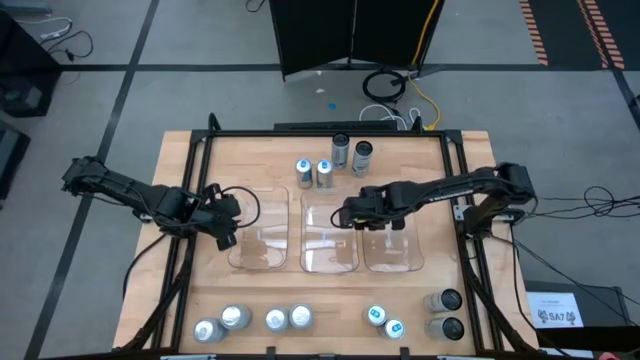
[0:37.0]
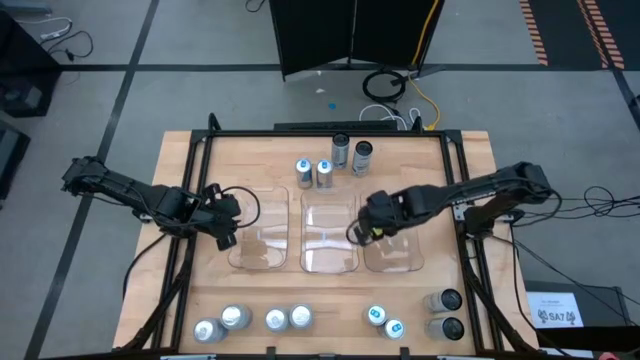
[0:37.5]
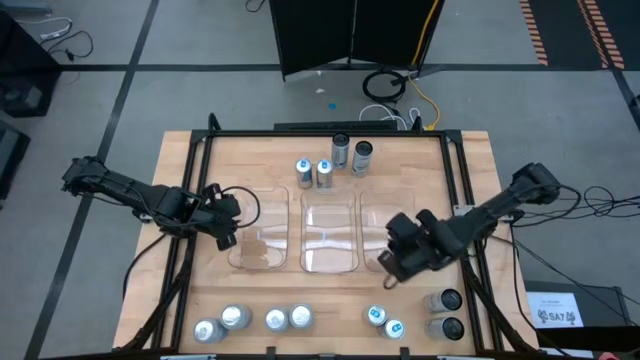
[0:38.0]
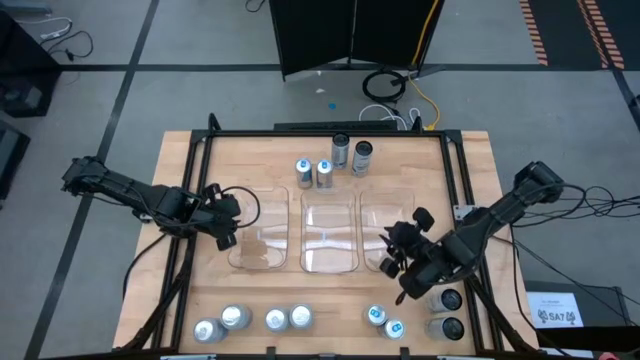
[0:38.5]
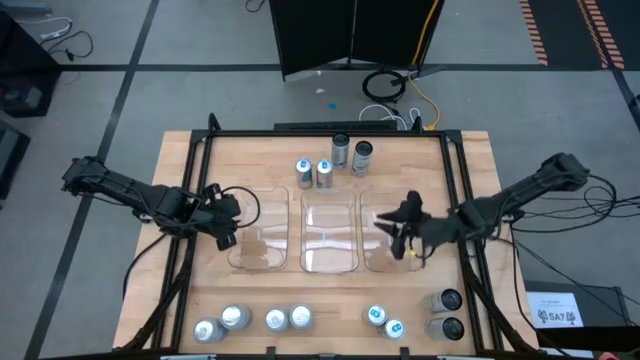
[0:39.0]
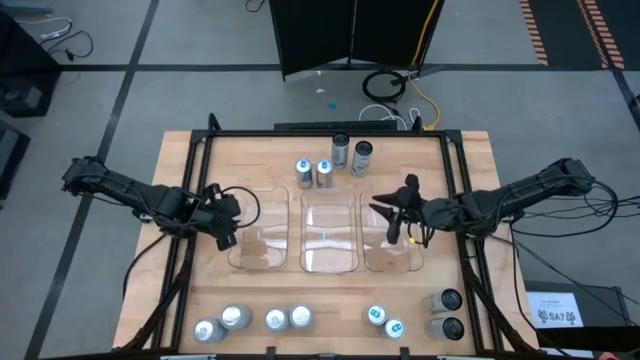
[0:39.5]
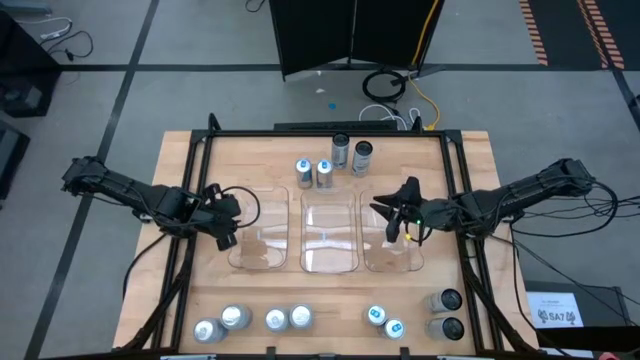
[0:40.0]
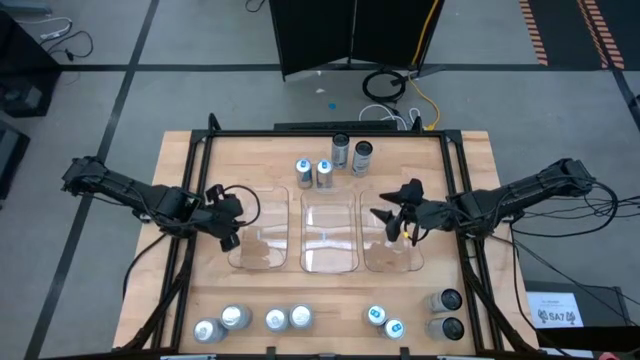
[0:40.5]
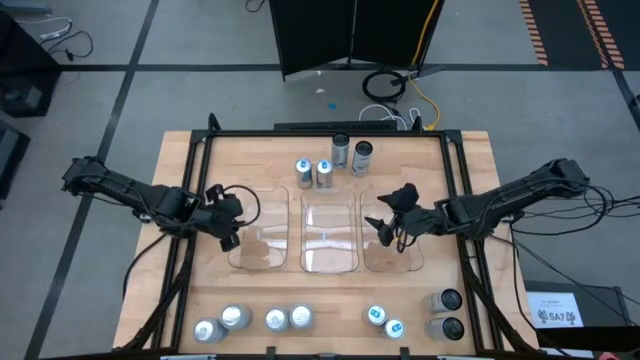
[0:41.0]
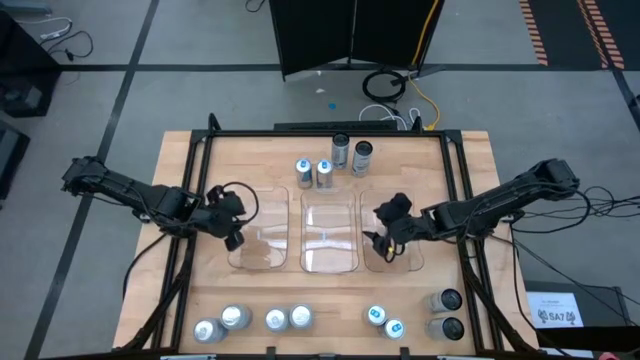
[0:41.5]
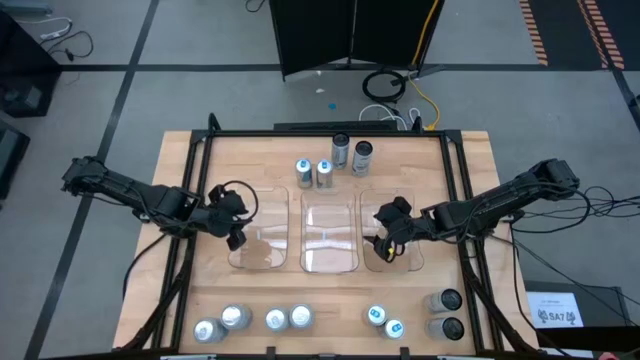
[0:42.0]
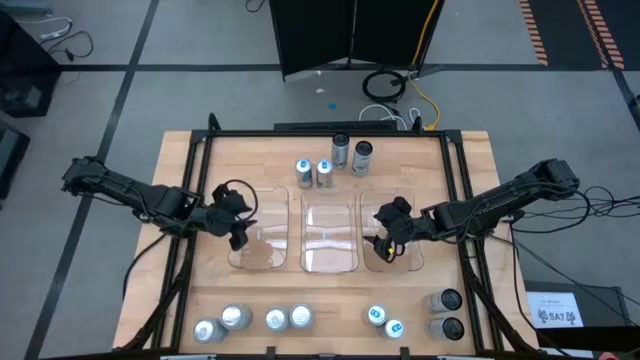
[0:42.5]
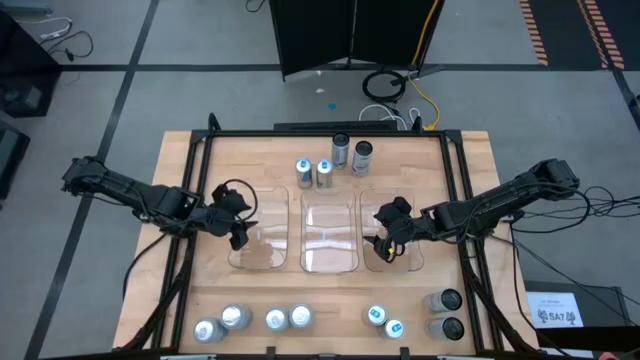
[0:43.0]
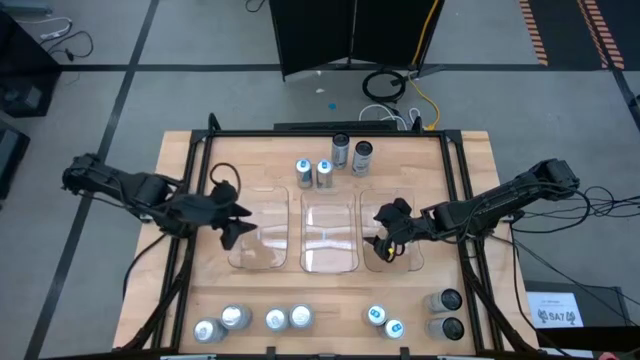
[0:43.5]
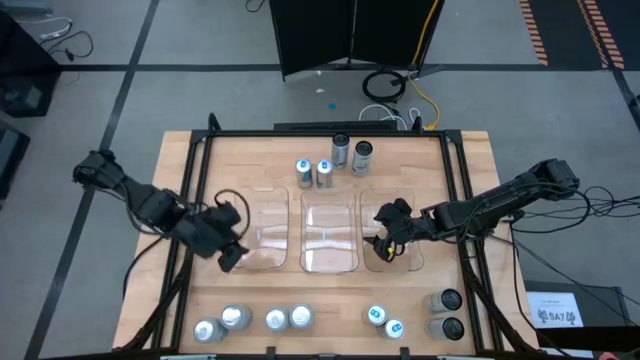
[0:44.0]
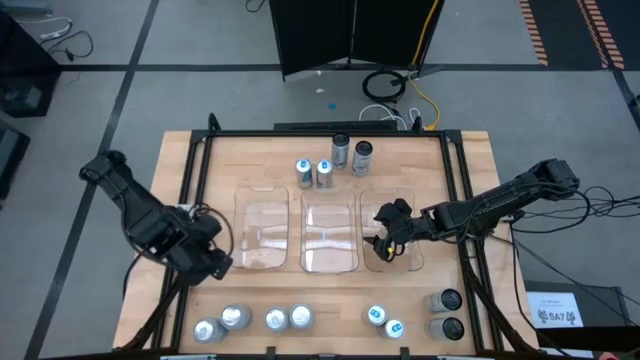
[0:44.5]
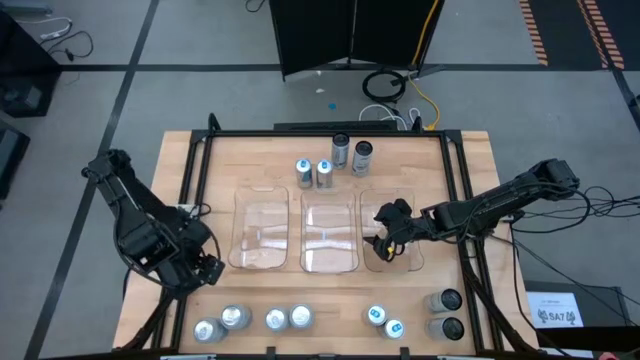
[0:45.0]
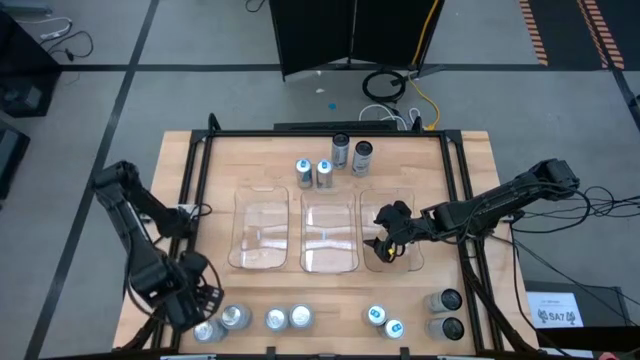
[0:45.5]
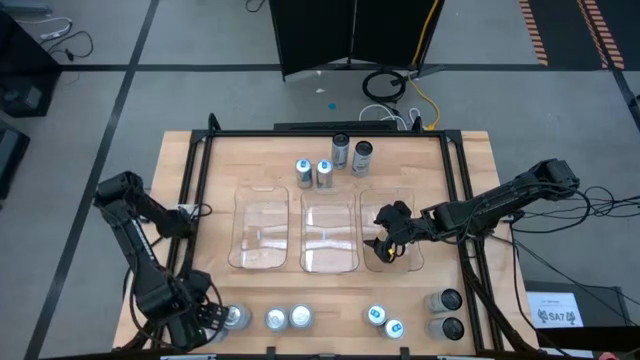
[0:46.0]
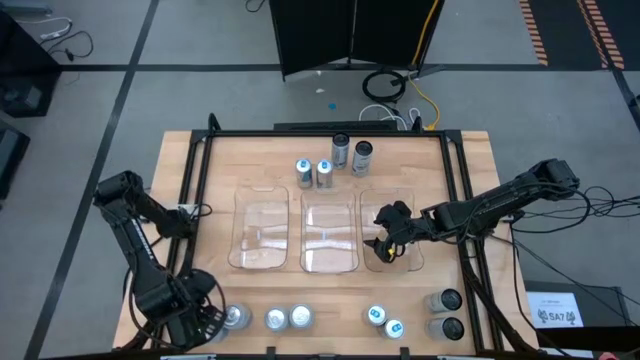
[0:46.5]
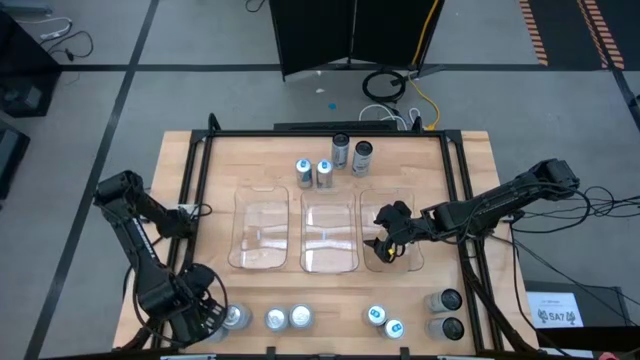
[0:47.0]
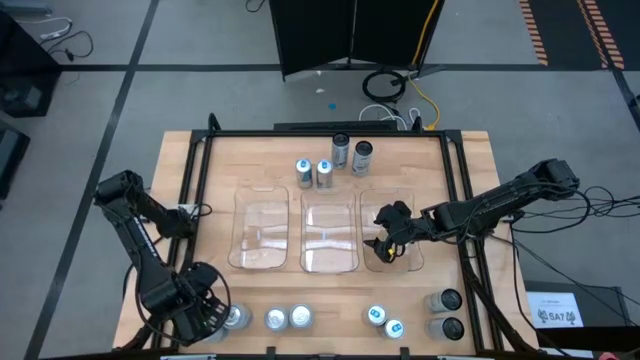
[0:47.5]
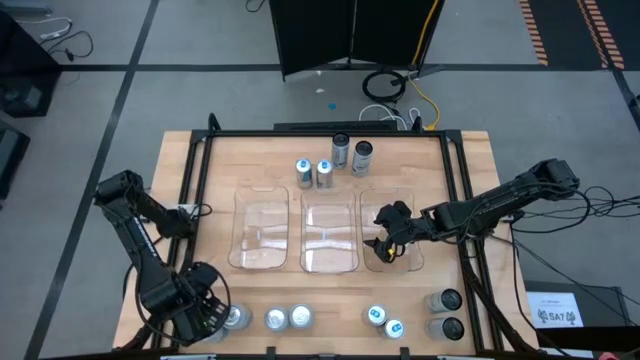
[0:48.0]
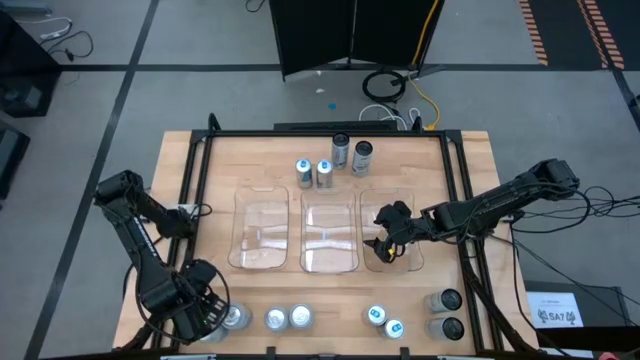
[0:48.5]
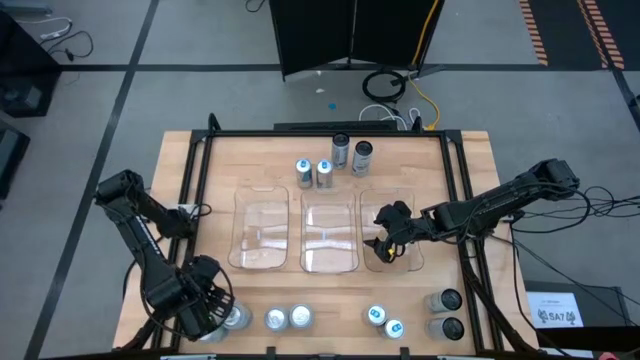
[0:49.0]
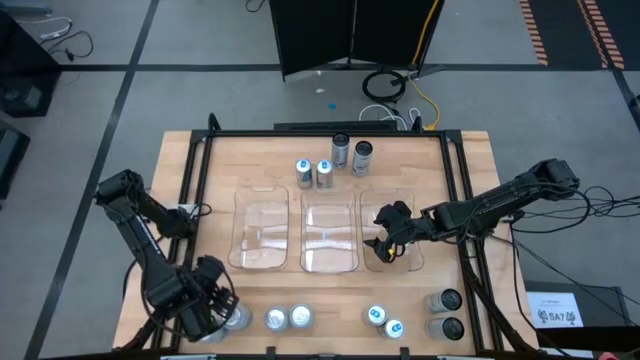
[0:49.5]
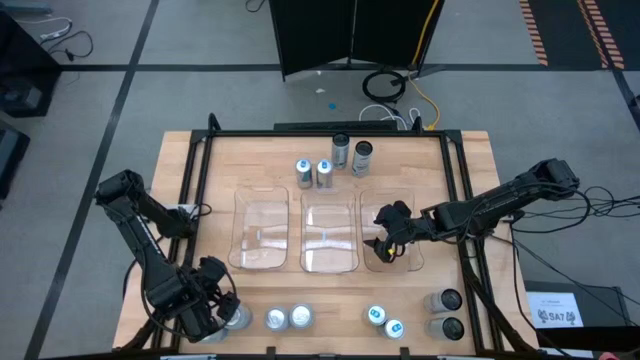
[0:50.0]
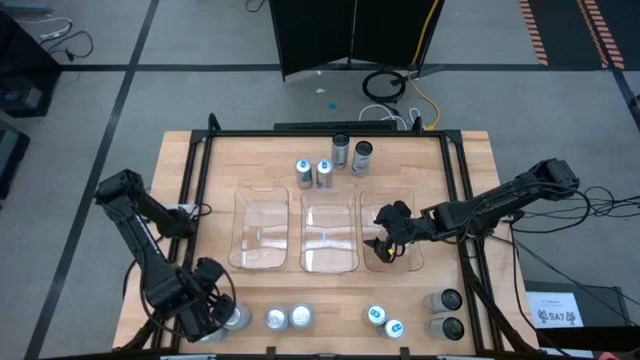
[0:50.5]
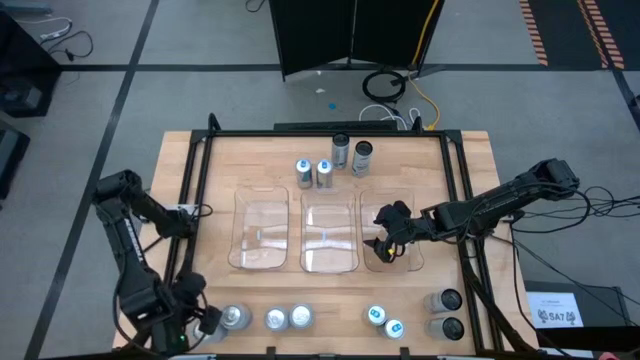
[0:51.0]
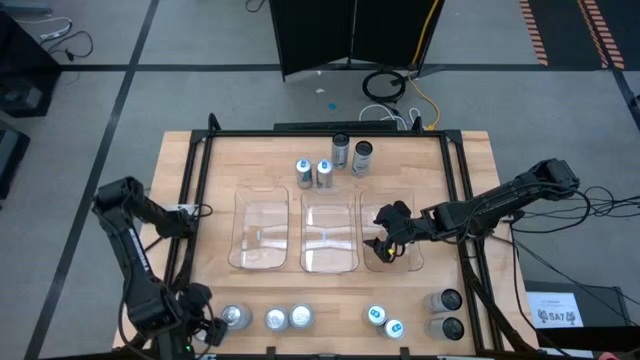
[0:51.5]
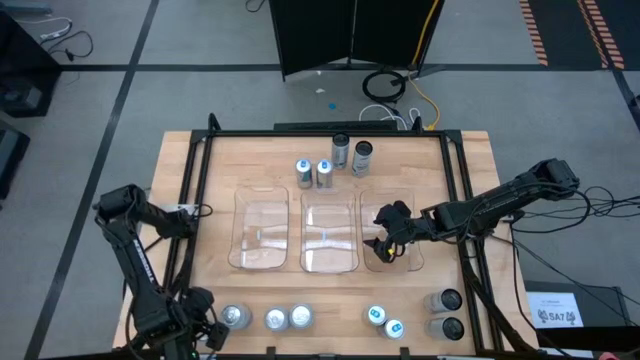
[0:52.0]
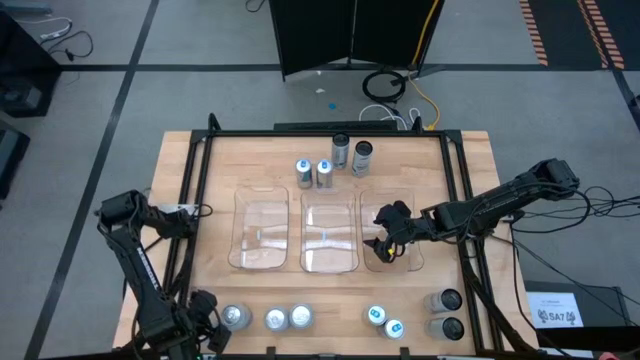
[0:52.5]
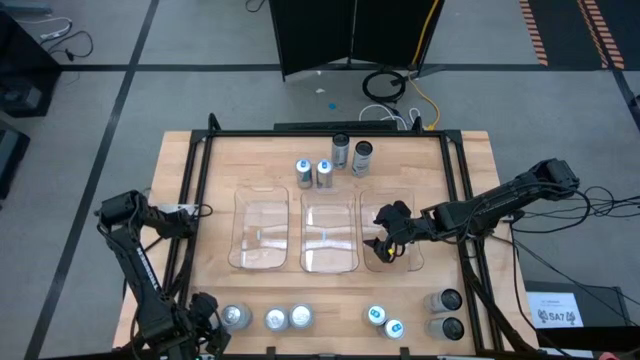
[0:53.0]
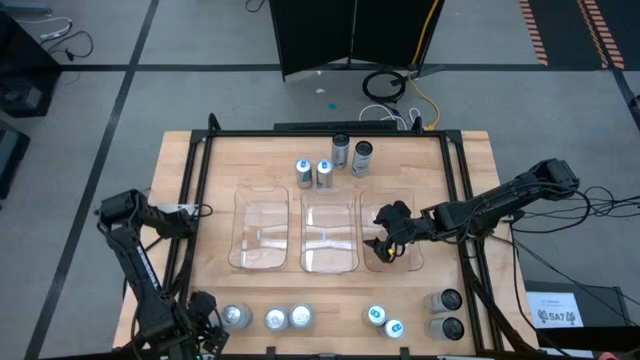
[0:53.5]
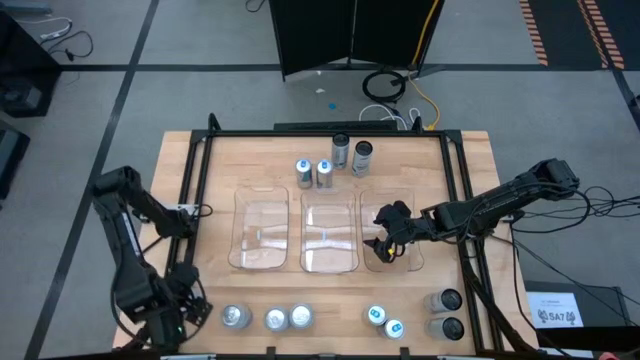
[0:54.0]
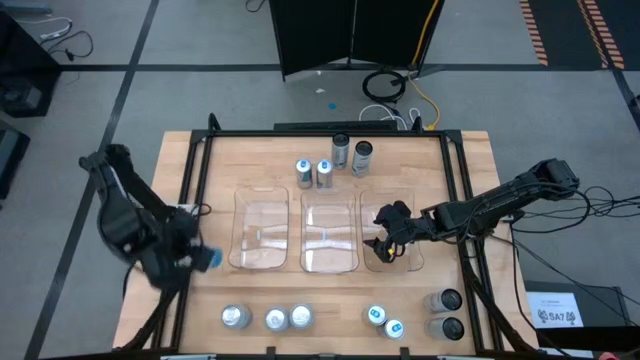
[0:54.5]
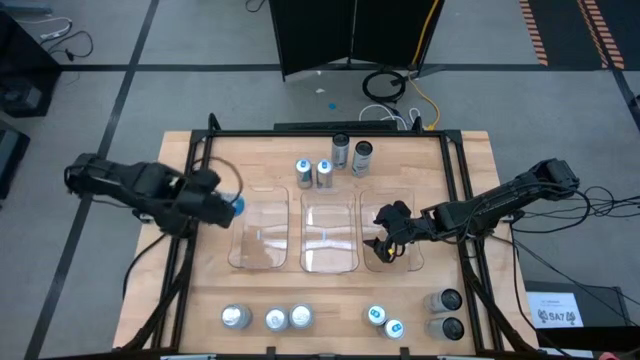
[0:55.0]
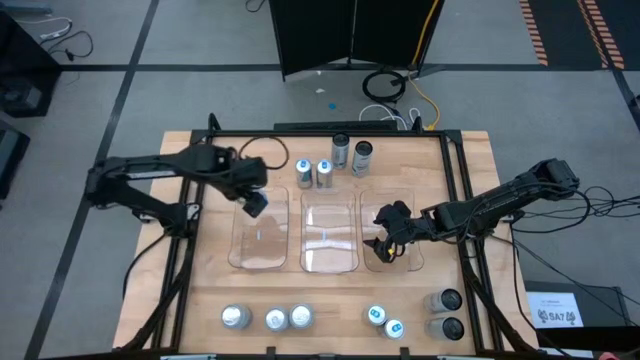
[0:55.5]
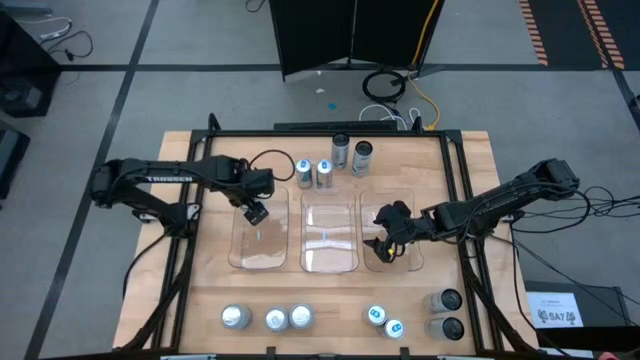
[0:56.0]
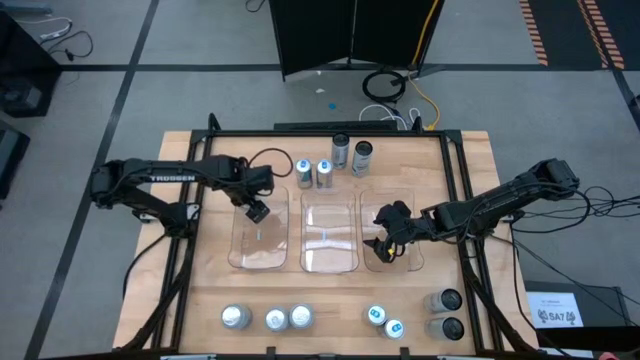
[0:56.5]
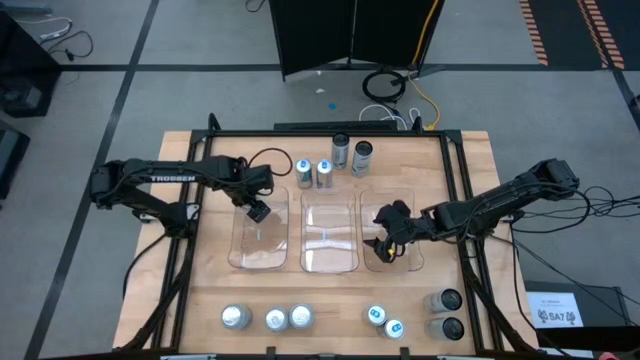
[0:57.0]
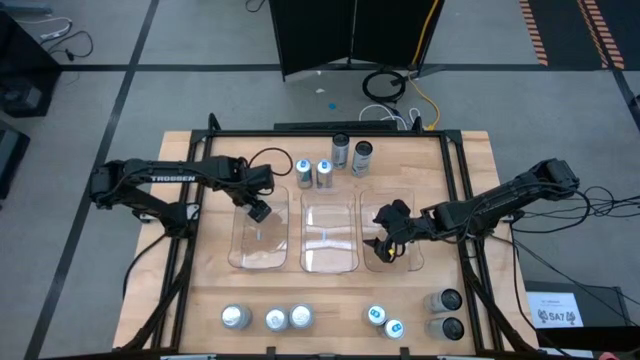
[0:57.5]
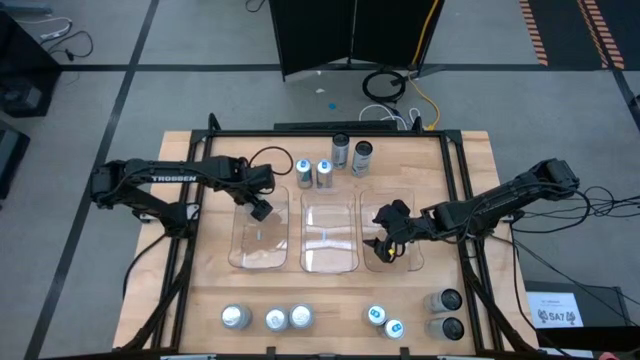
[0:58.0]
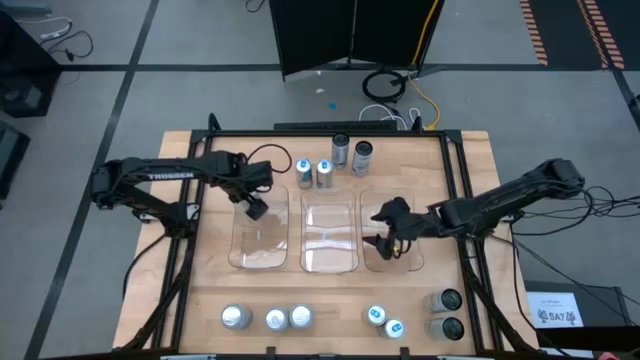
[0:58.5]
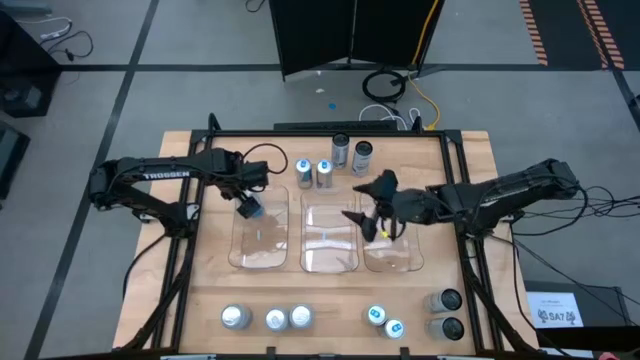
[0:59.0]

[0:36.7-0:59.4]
Task: Sort soda cans
Put the bottom left blue-white soda can into the left transparent bin
